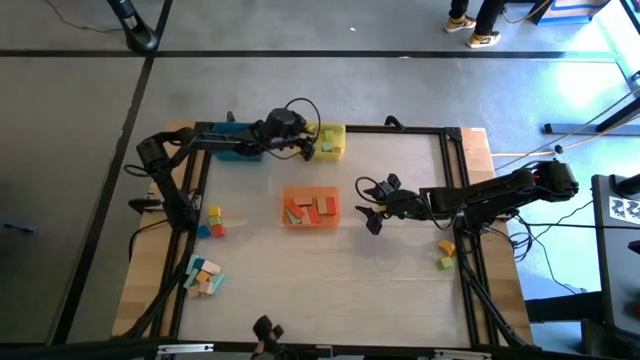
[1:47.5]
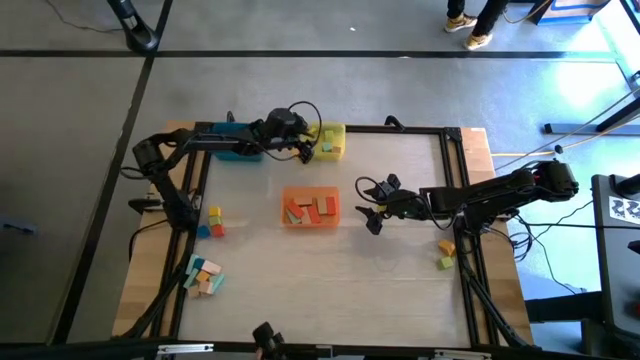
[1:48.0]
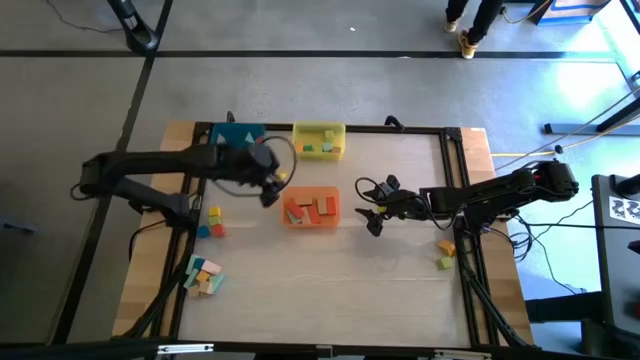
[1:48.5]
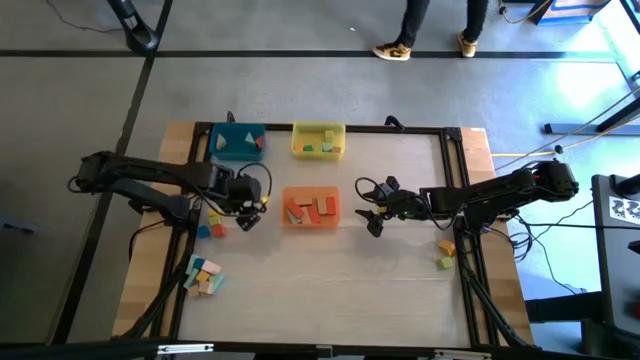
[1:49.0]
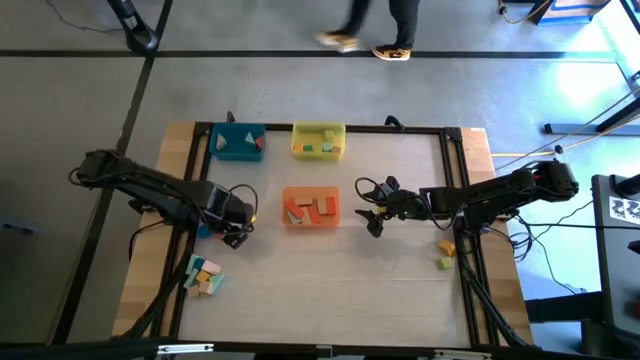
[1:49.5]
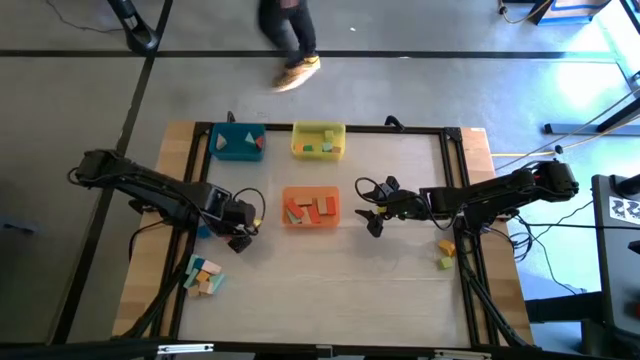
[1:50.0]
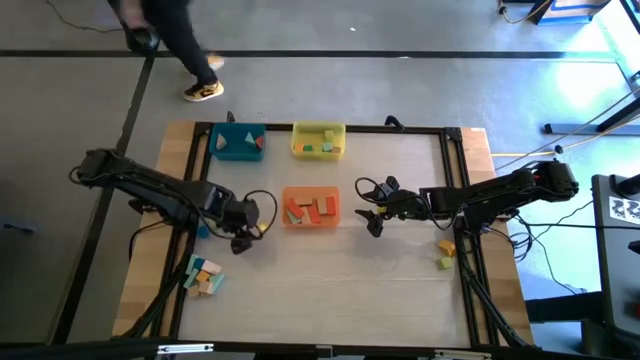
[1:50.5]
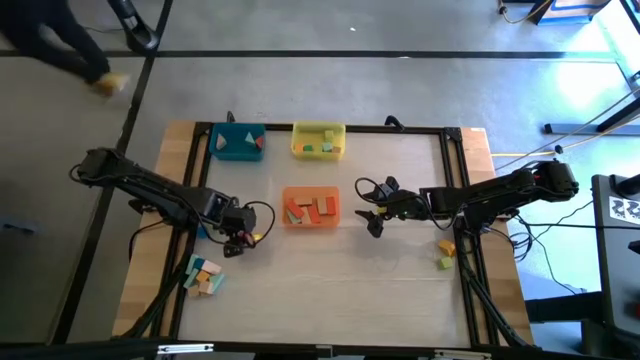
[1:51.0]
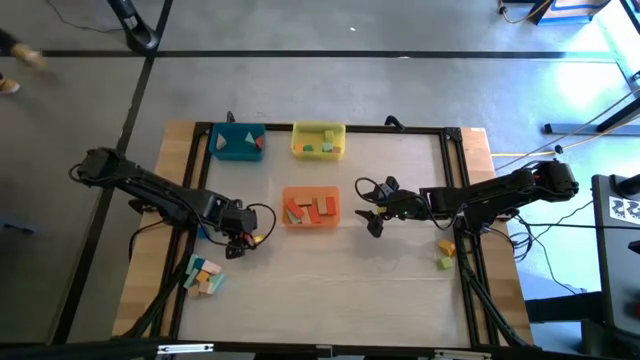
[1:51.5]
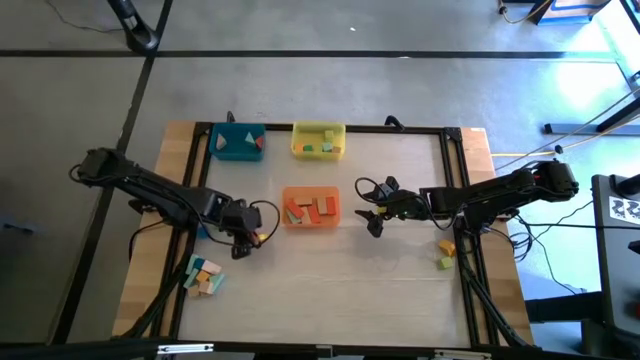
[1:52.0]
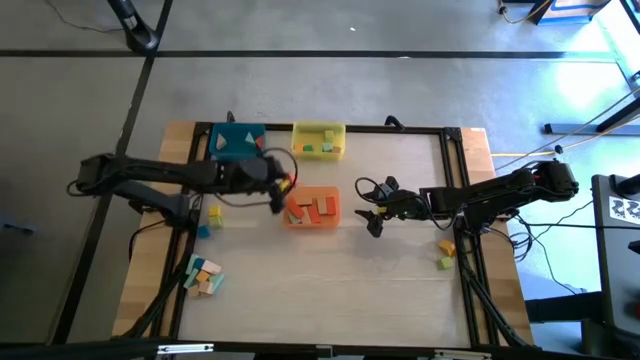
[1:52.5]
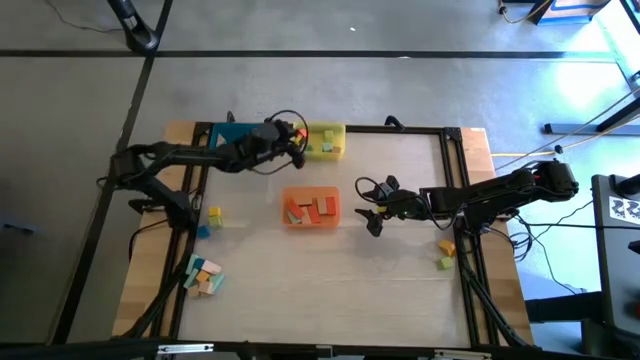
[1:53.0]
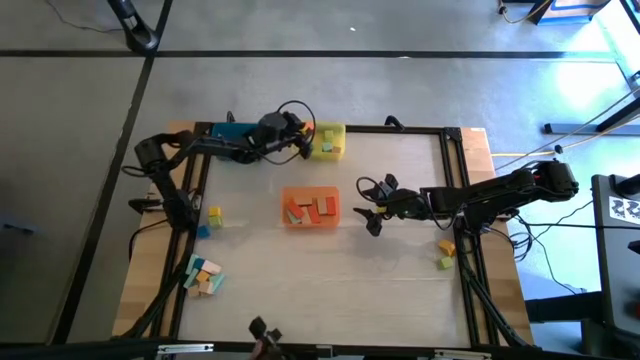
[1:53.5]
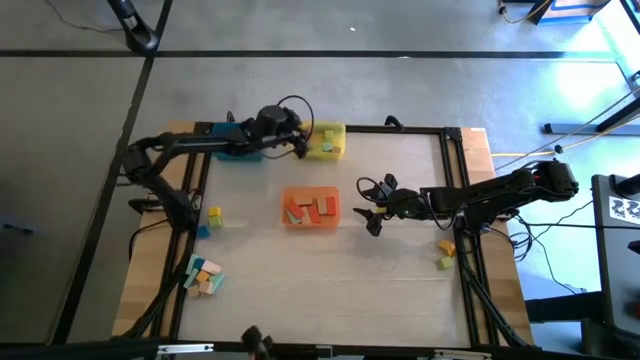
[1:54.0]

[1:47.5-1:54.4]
Task: Sort blocks by size
Put the orange square block into the yellow bin

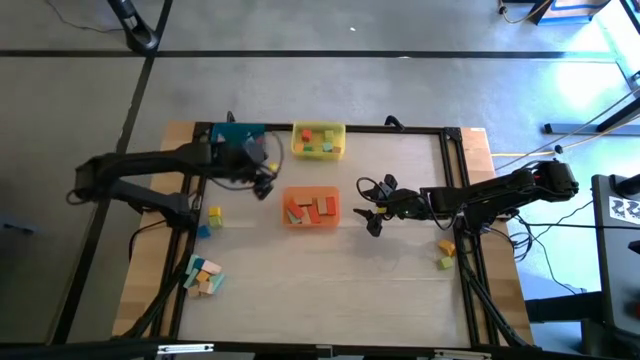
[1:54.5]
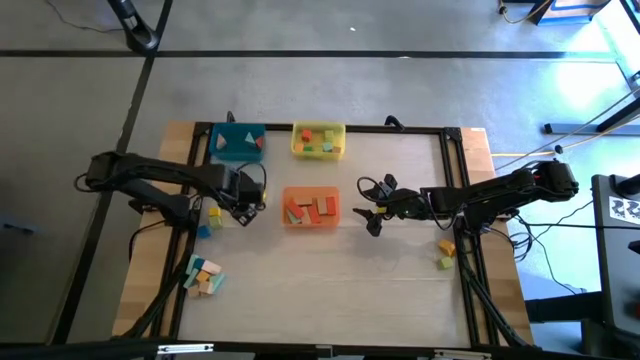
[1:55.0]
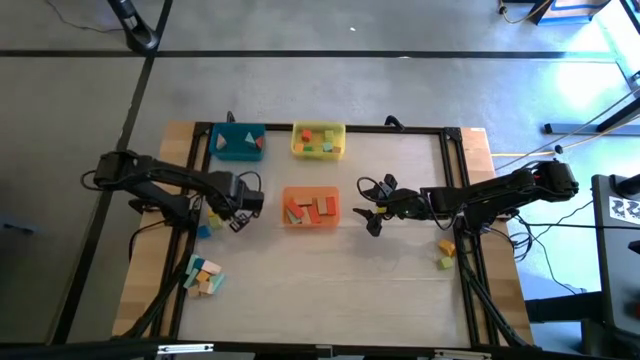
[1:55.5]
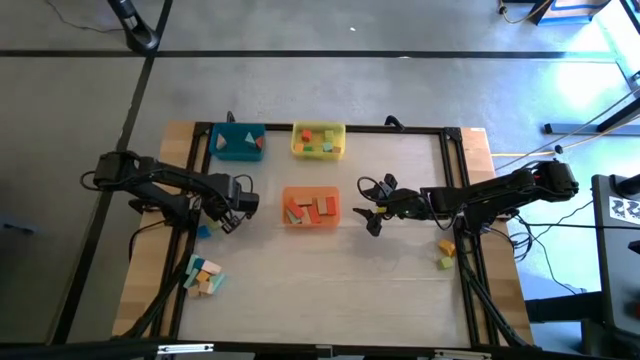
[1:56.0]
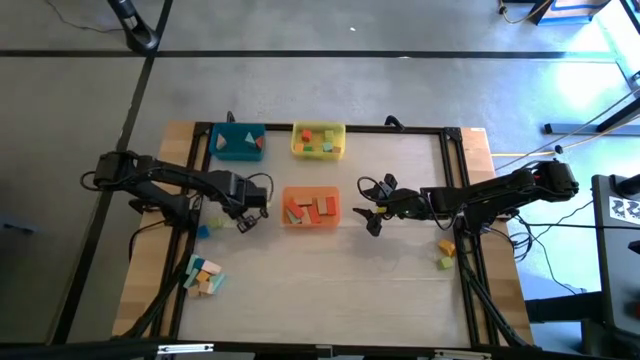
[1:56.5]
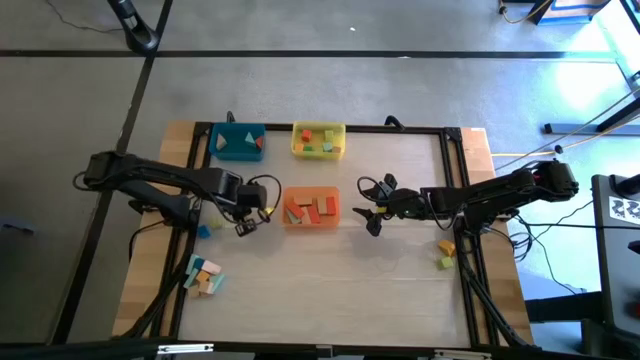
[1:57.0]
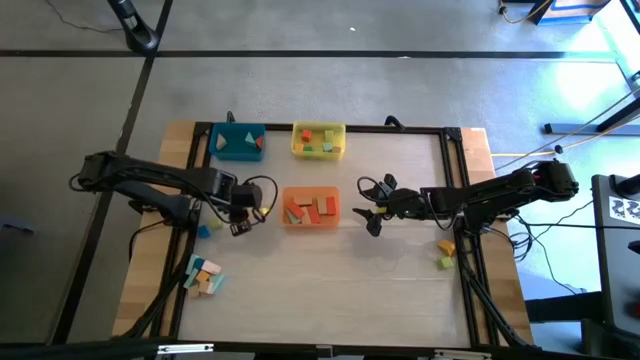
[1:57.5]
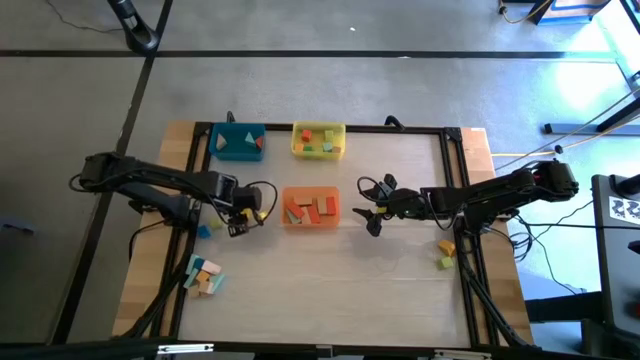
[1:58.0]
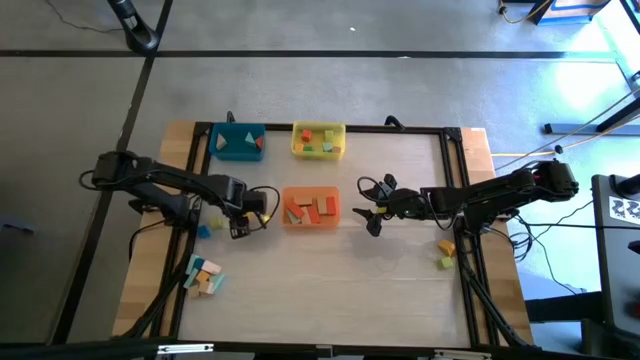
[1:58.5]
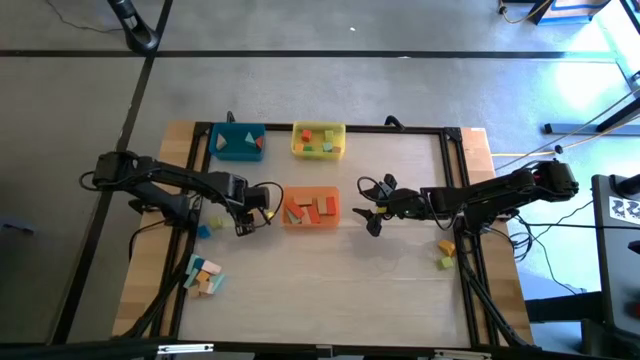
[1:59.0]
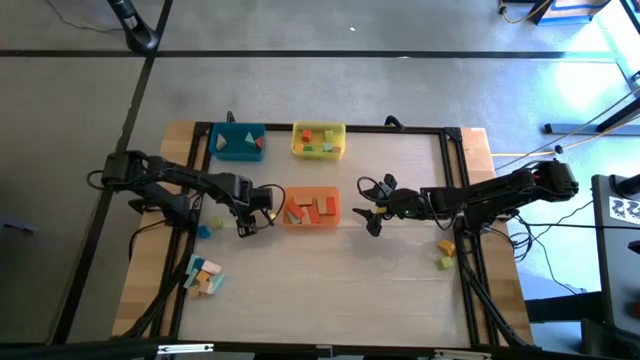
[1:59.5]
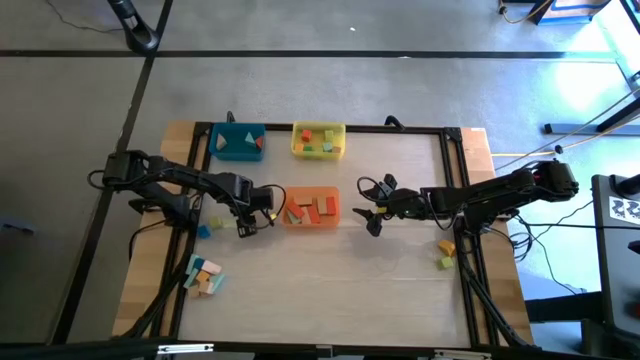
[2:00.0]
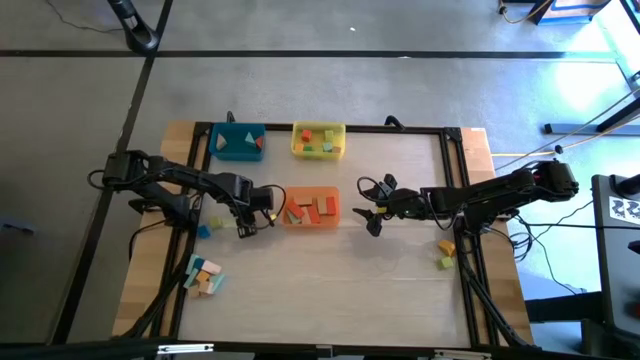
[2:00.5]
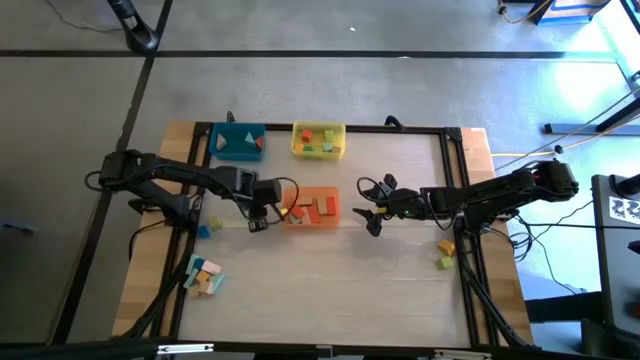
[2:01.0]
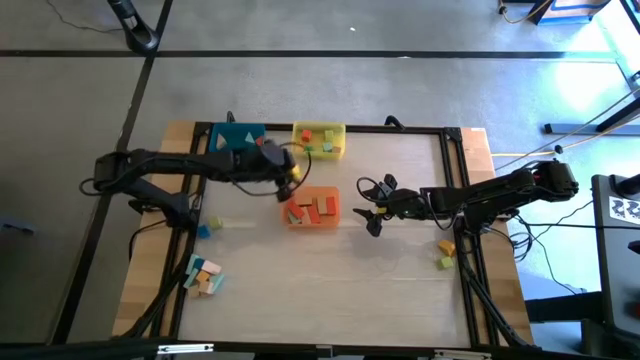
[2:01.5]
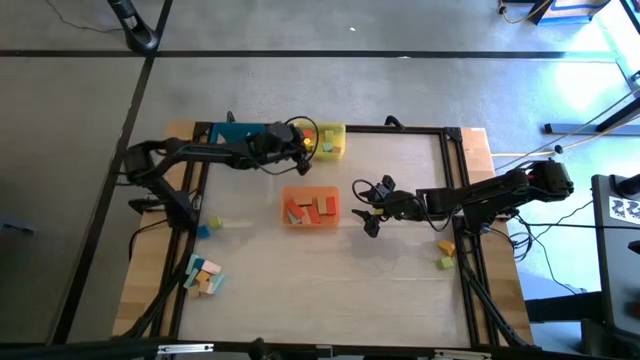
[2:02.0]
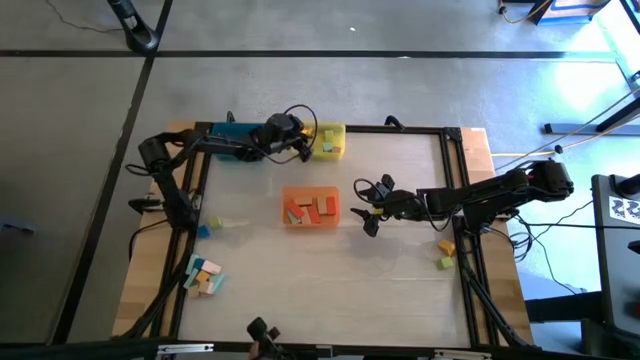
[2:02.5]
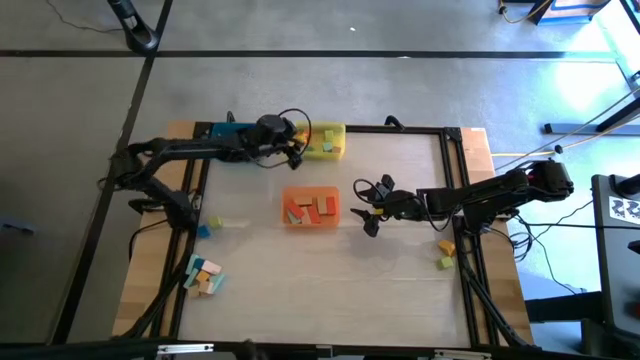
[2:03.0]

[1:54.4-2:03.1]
Put the yellow square block into the yellow bin

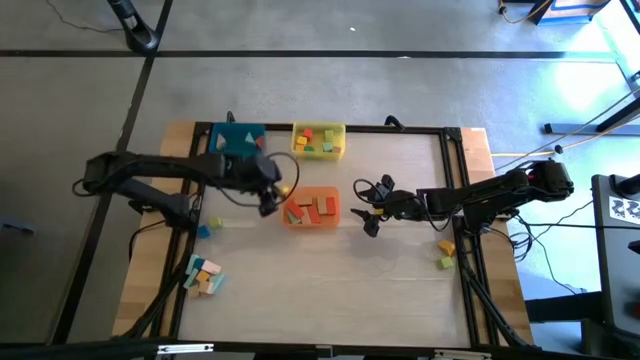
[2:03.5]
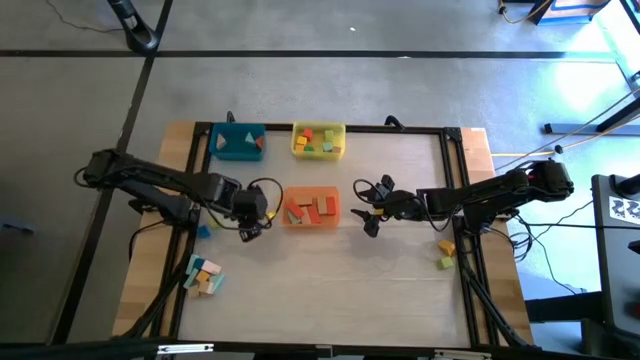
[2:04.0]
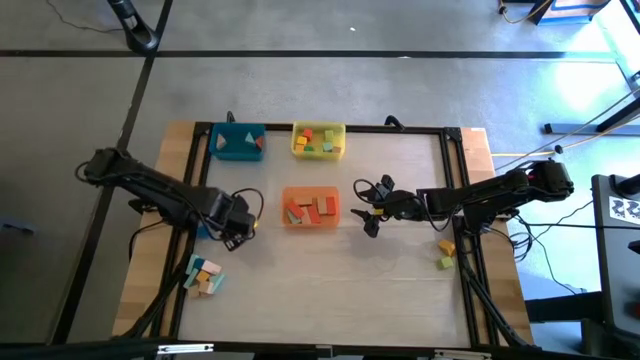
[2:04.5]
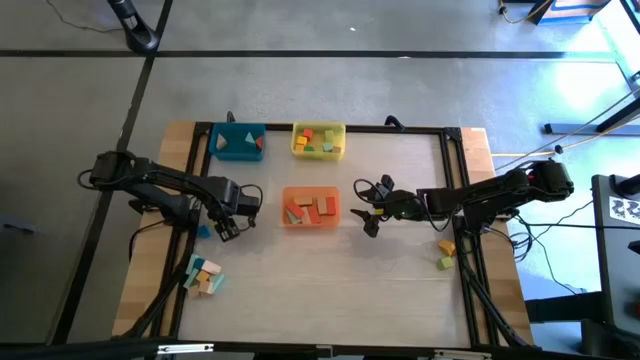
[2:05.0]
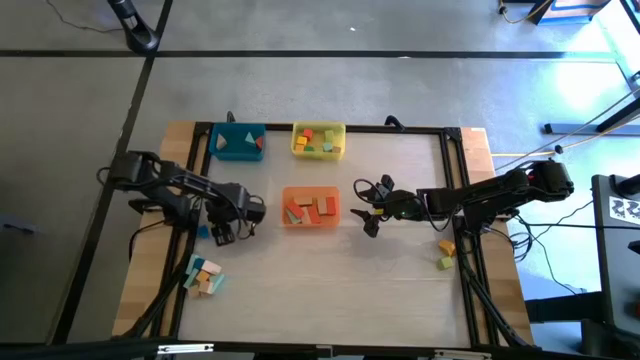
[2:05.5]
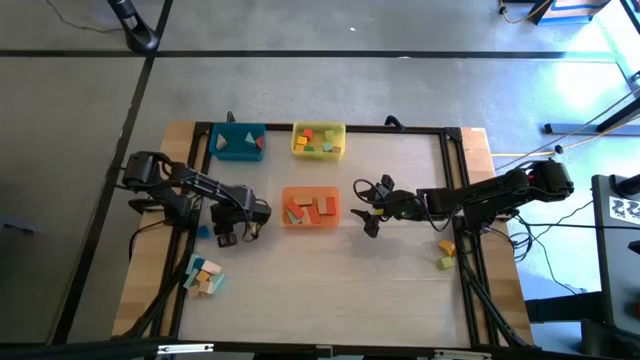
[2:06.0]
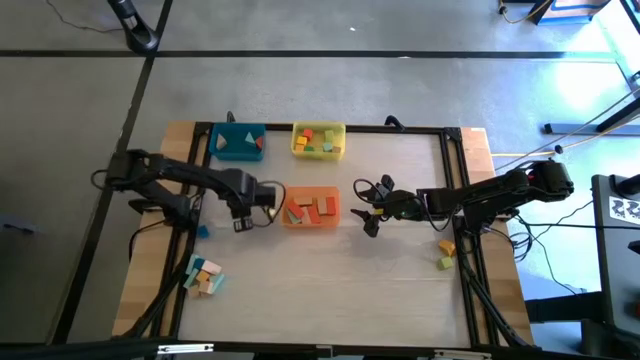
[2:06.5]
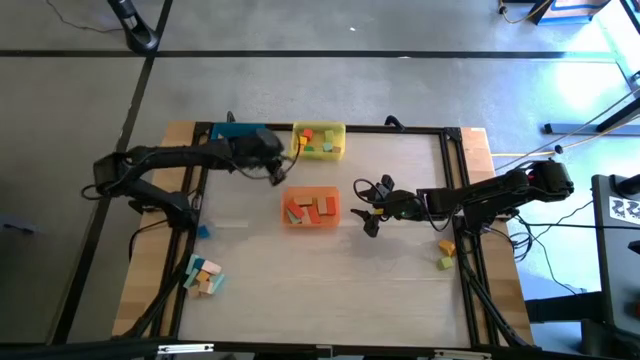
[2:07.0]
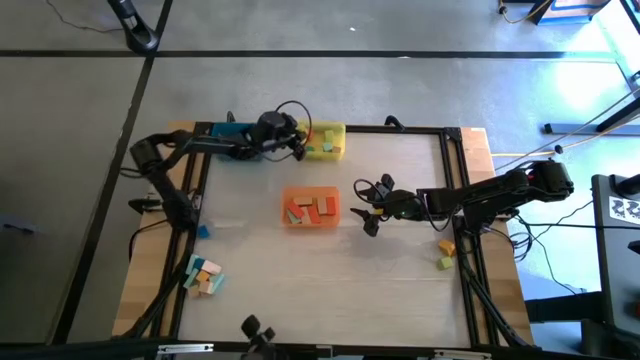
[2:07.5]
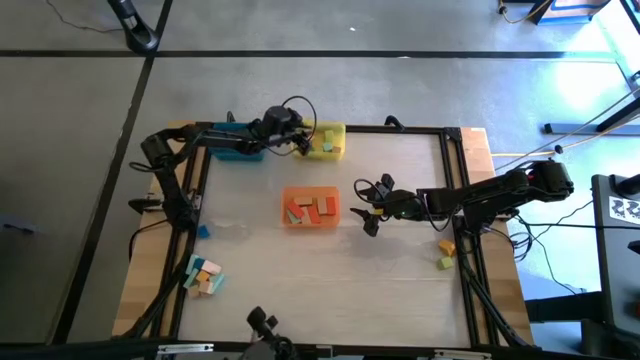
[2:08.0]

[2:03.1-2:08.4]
Put the light green square block into the yellow bin
